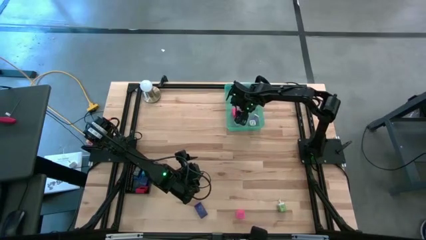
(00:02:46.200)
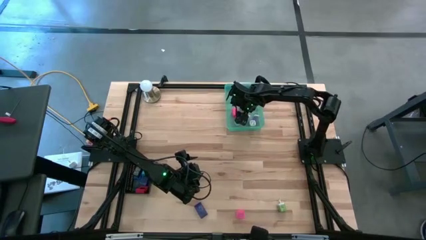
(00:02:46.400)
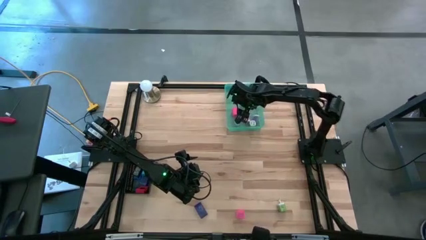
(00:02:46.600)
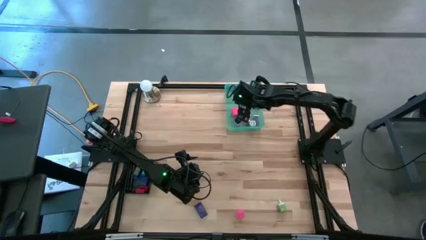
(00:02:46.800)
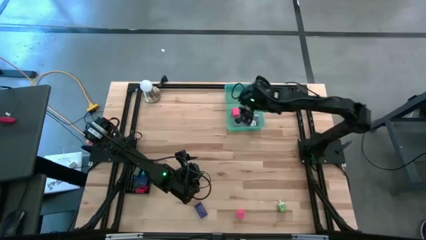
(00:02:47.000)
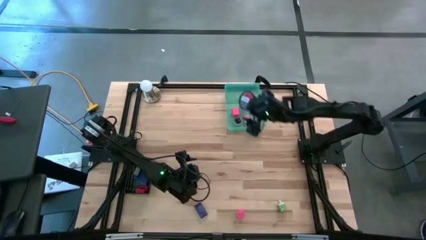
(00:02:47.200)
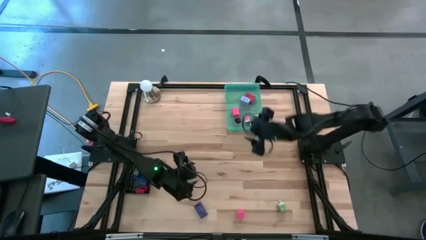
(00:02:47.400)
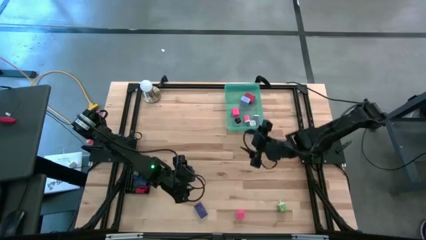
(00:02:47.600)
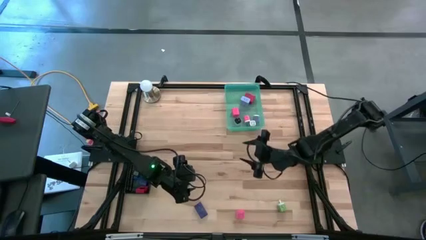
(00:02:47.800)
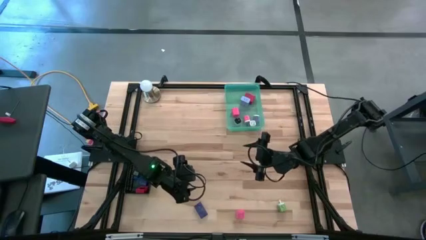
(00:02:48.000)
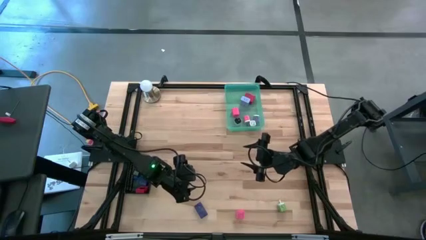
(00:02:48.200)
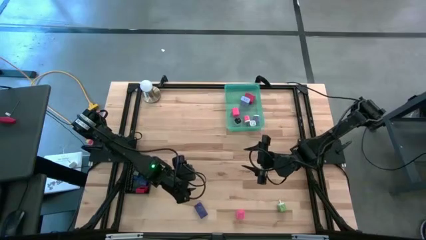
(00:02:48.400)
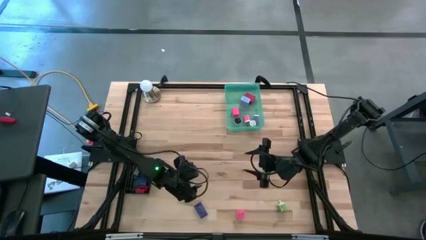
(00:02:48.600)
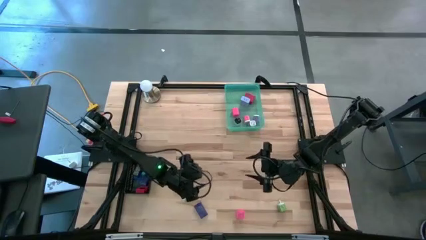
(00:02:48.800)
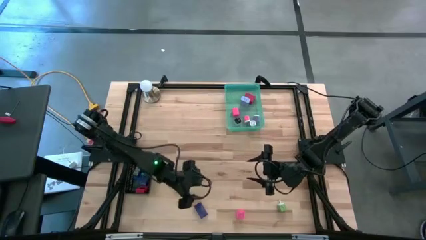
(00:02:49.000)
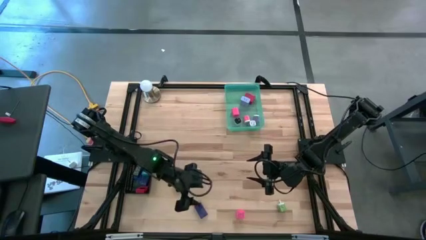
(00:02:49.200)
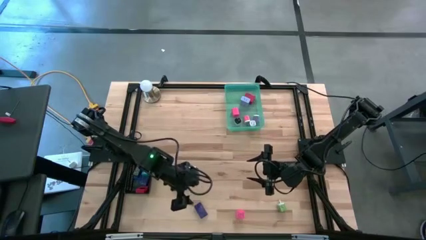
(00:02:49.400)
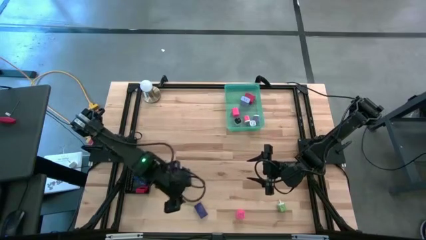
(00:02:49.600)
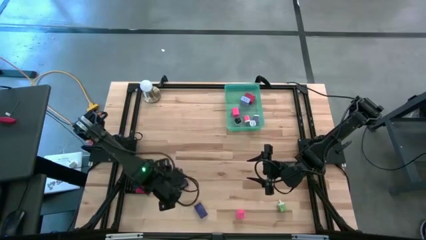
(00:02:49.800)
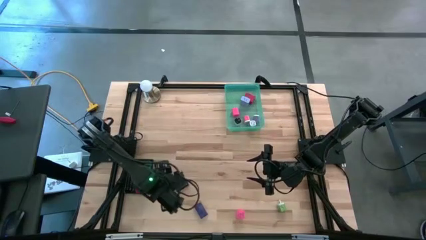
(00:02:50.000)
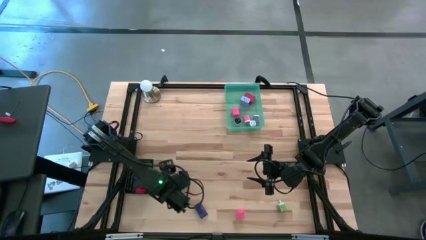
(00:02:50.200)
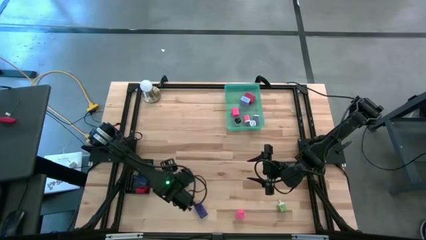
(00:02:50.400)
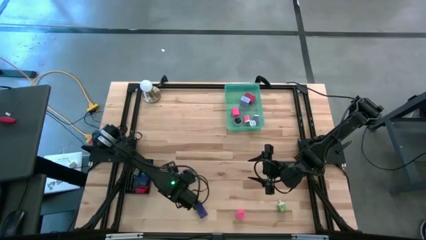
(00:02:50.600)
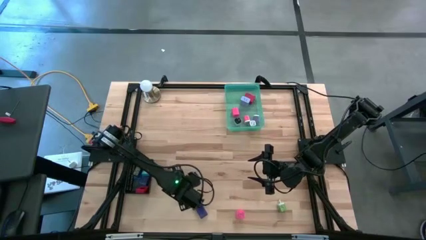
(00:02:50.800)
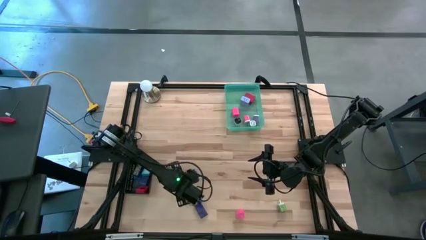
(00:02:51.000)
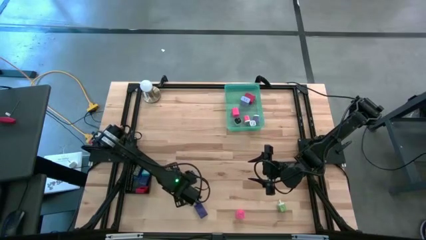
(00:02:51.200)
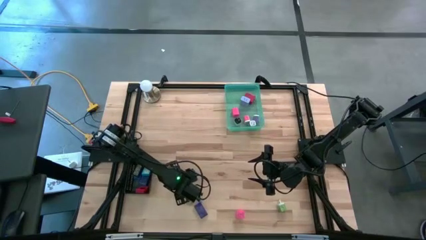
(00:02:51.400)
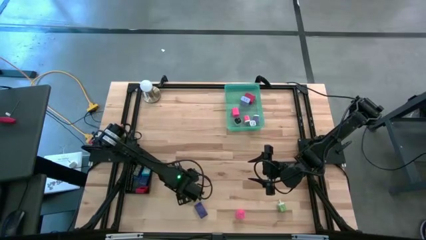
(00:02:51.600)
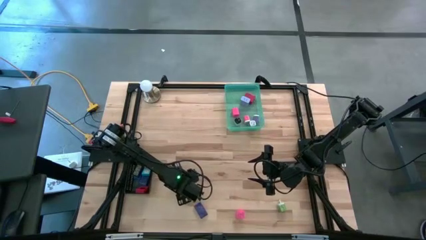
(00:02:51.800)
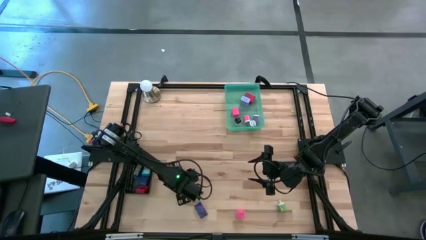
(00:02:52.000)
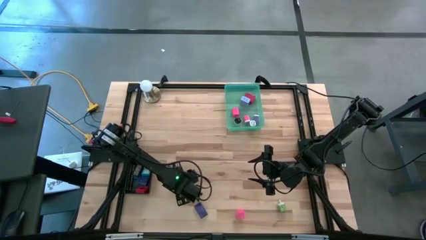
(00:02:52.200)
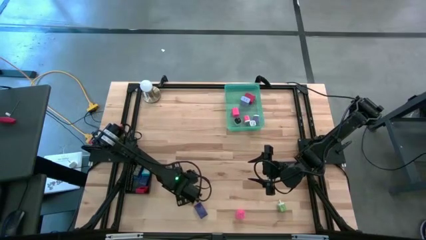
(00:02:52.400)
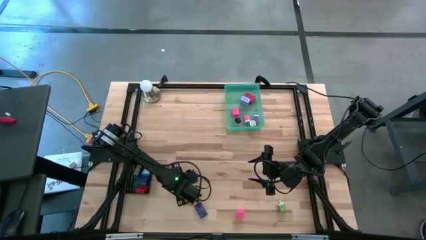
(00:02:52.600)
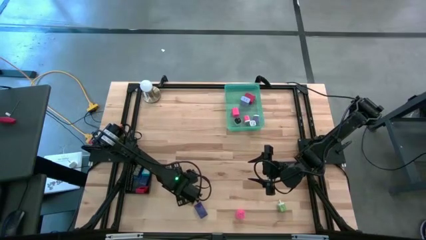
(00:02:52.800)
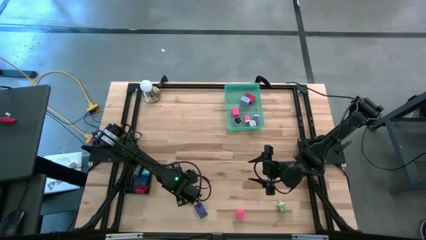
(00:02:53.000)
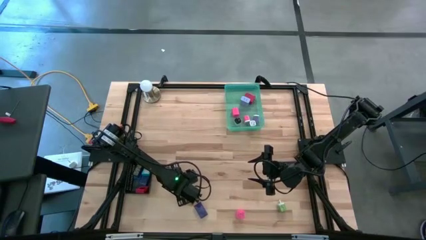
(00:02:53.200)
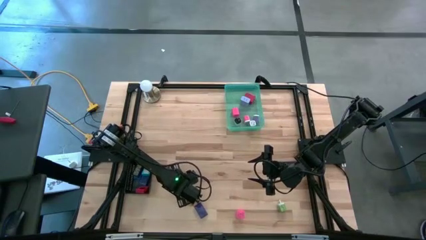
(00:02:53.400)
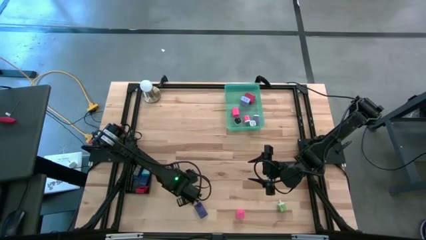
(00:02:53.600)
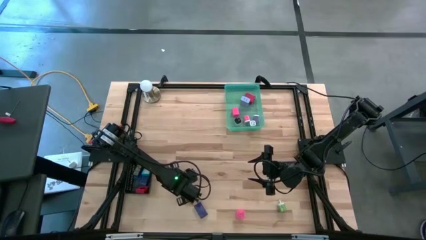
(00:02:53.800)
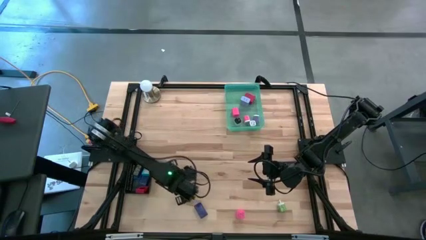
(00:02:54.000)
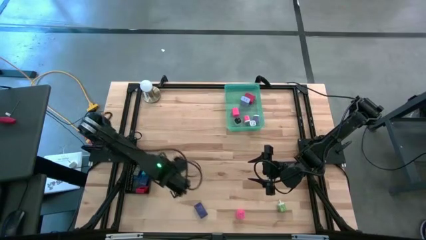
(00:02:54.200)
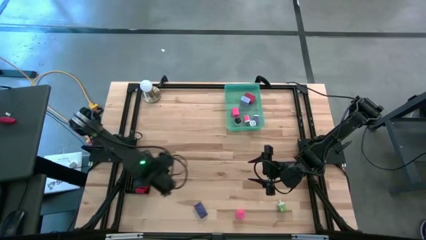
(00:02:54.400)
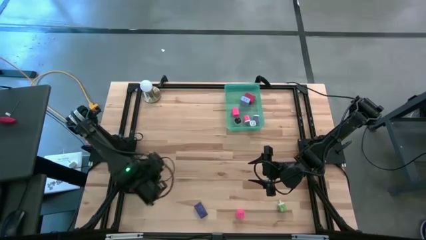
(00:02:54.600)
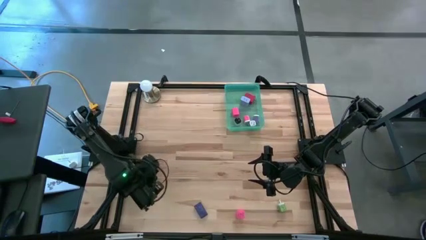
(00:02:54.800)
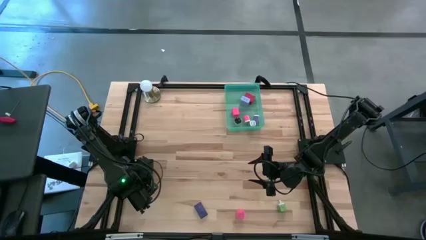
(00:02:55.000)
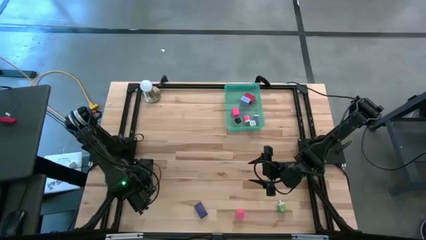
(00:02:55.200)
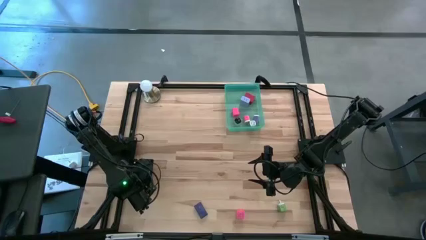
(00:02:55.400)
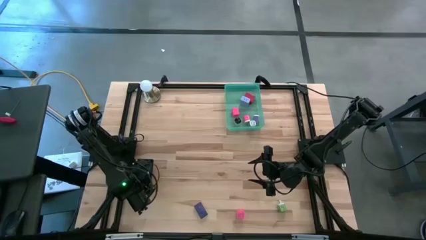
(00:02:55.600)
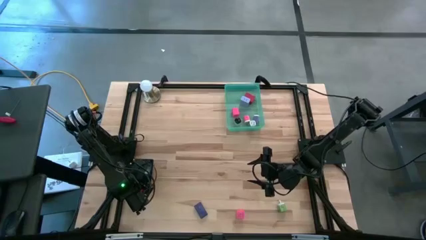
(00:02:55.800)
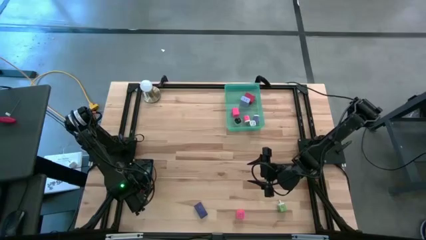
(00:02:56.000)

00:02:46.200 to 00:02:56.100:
Task: Pick & Place Office items
Put the black digital timer into the black bin

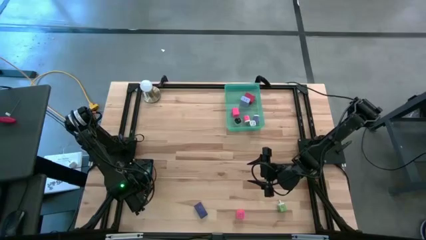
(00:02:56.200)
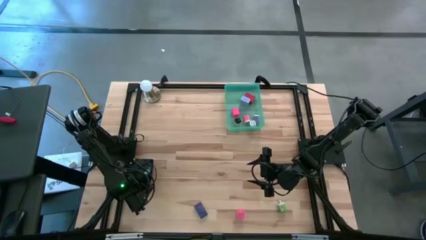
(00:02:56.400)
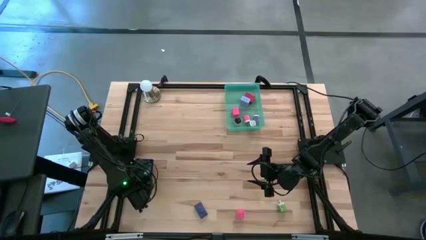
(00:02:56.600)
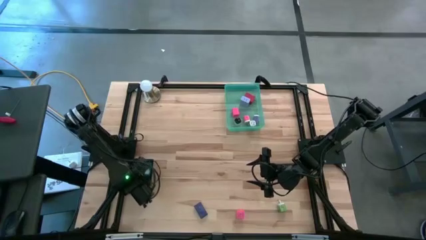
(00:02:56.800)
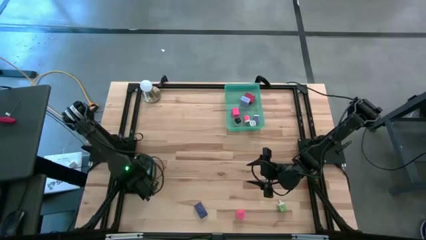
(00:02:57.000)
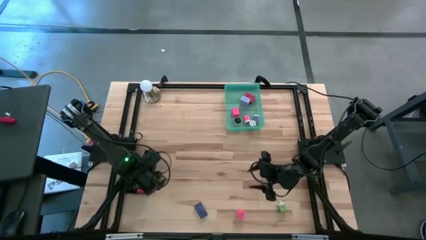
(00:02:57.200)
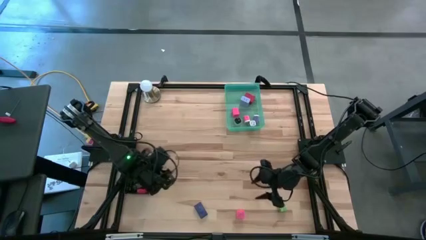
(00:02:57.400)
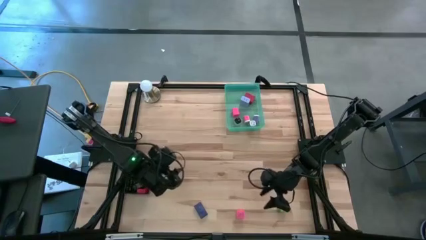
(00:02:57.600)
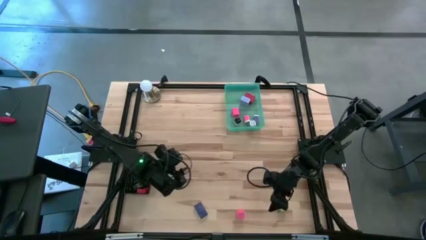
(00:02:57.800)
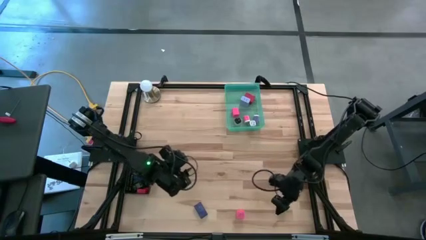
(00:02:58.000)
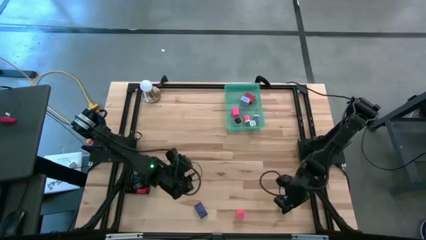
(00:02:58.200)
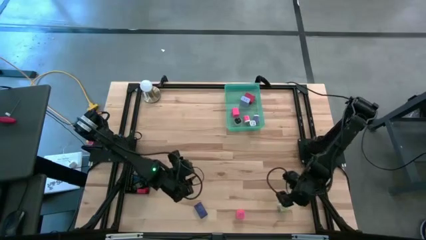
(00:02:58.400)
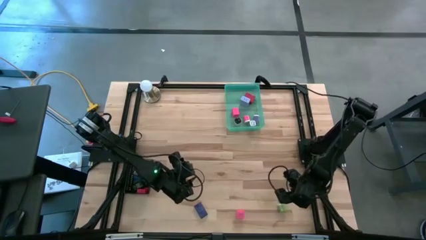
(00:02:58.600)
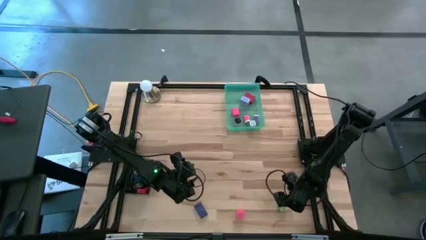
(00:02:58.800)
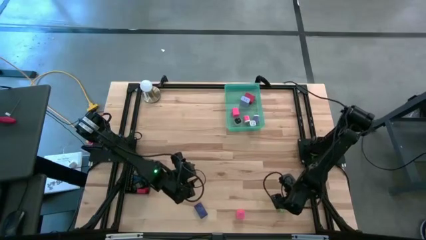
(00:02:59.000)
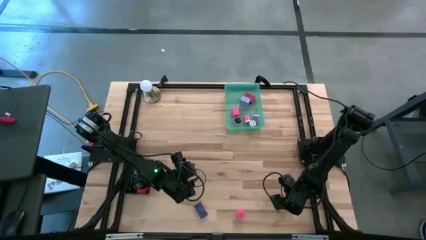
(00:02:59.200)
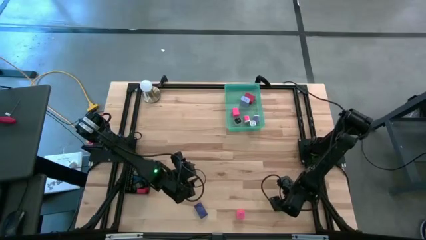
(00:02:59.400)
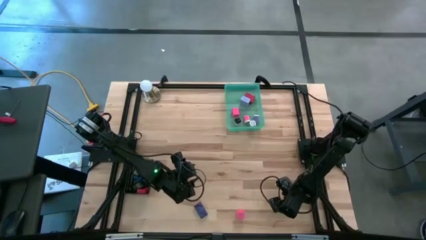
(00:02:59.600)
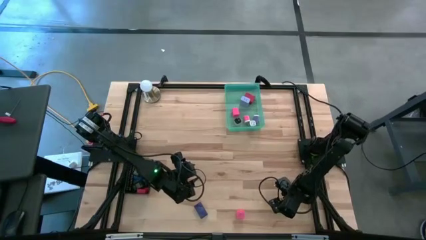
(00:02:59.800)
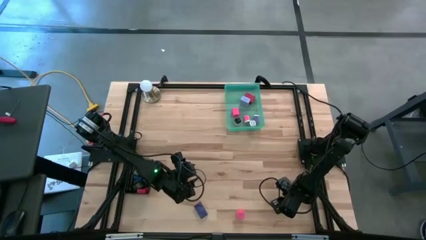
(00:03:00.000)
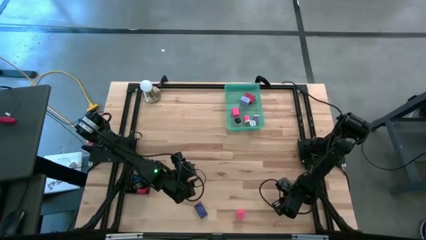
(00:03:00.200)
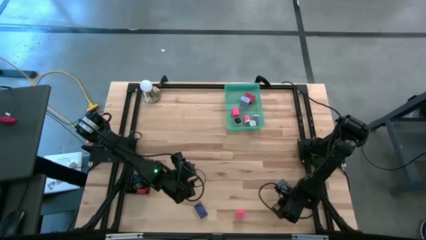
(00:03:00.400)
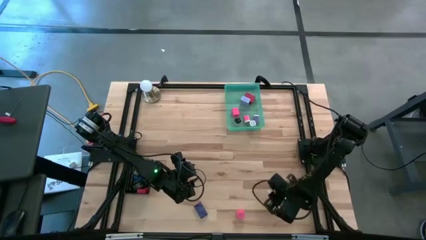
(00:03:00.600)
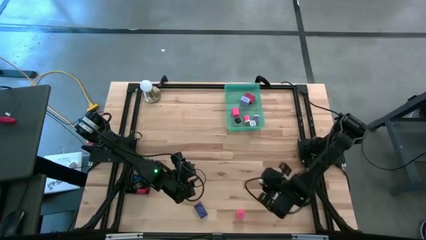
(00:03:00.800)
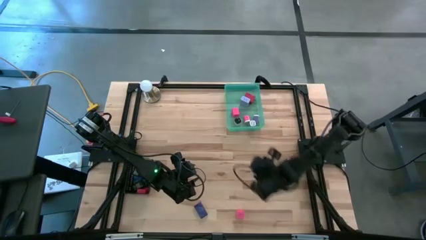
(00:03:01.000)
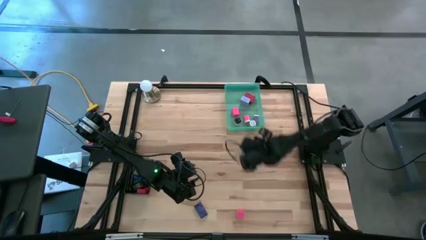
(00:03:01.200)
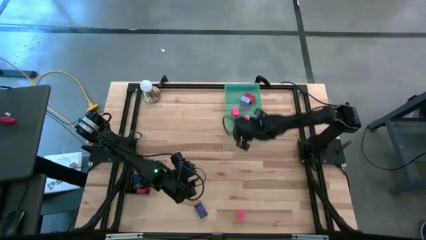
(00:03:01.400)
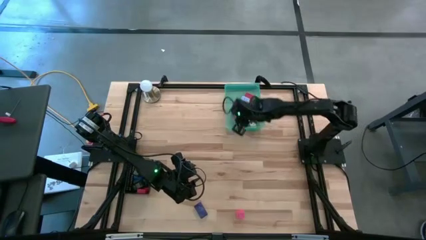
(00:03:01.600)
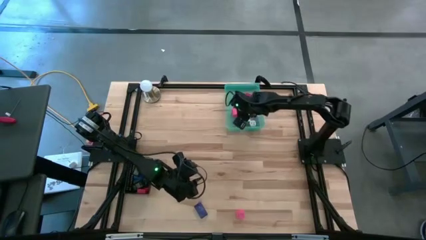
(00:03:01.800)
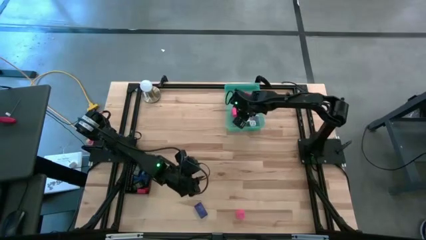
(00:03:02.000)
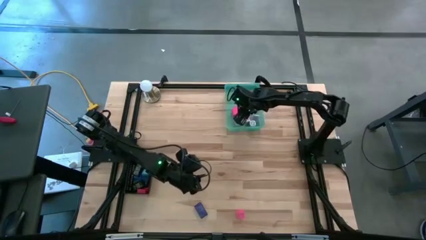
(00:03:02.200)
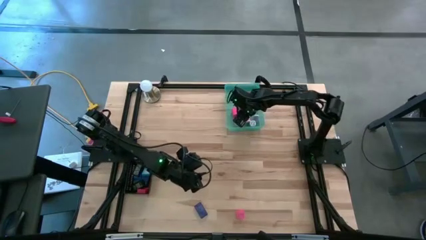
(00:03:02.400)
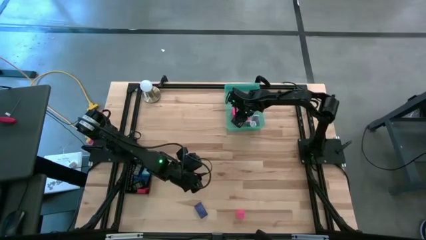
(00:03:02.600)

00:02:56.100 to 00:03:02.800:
Put the green charger adapter into the green bin
